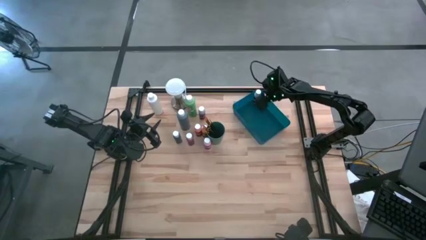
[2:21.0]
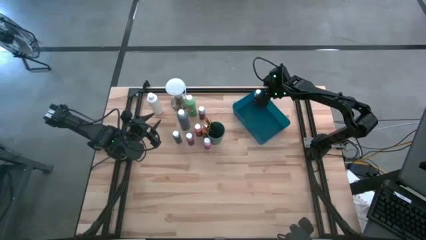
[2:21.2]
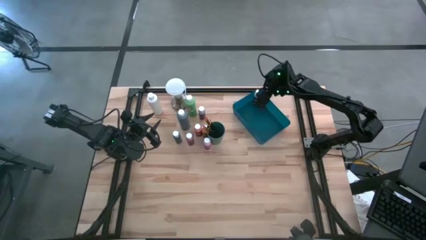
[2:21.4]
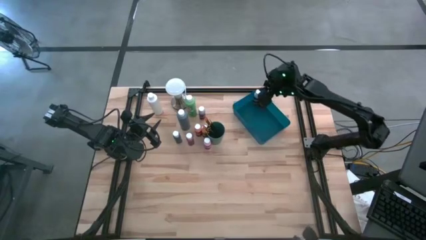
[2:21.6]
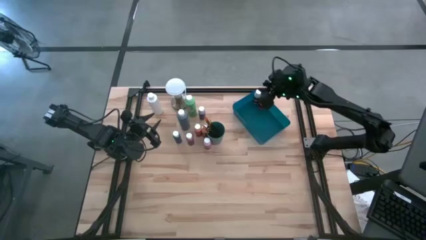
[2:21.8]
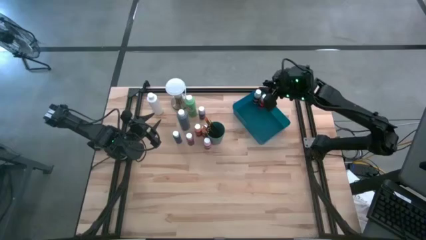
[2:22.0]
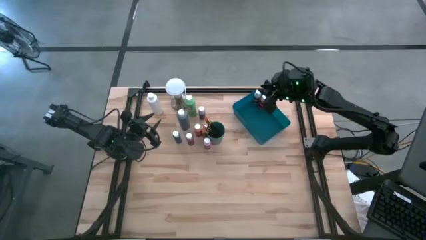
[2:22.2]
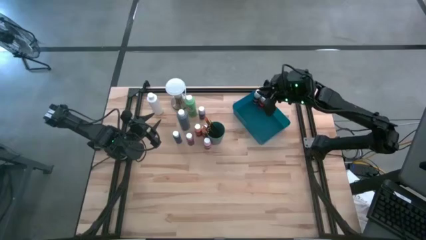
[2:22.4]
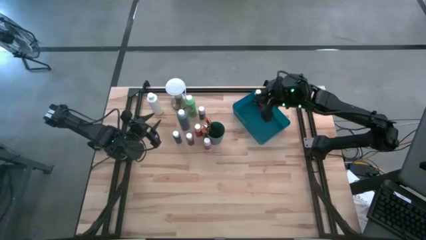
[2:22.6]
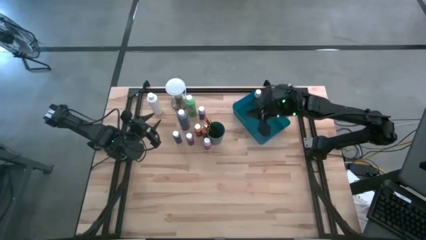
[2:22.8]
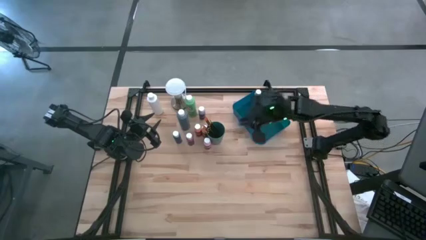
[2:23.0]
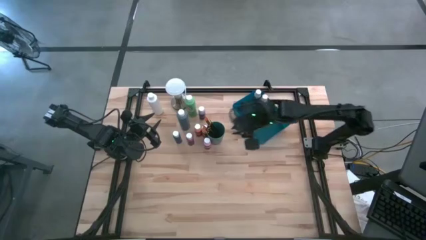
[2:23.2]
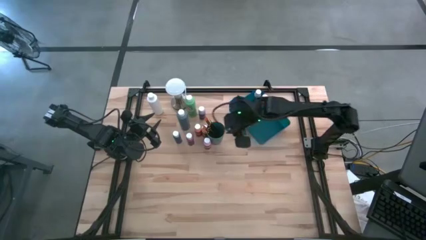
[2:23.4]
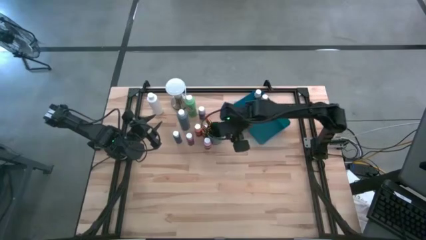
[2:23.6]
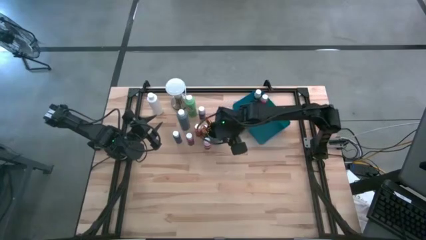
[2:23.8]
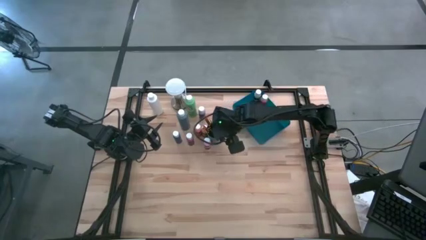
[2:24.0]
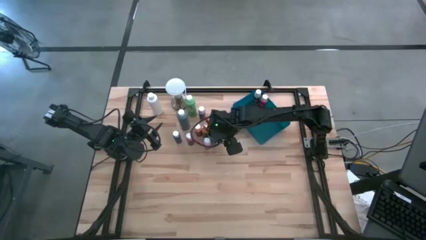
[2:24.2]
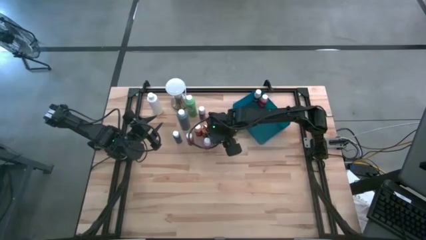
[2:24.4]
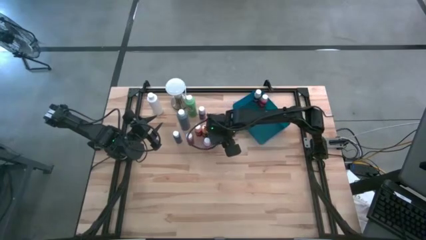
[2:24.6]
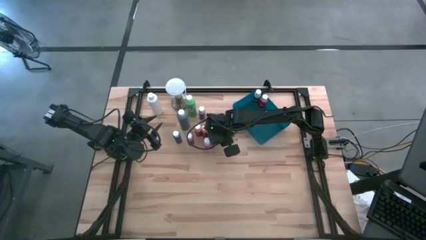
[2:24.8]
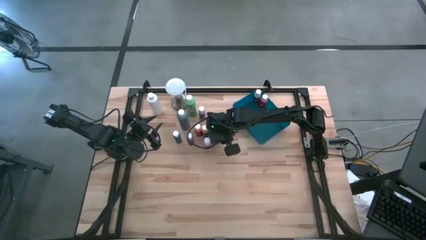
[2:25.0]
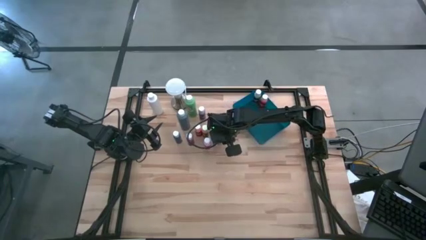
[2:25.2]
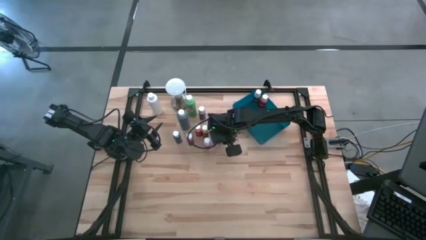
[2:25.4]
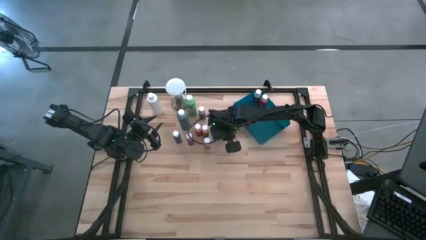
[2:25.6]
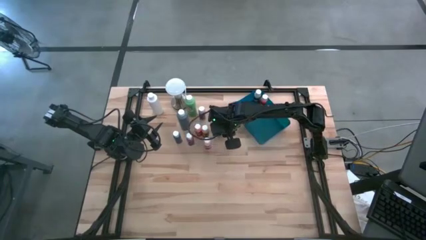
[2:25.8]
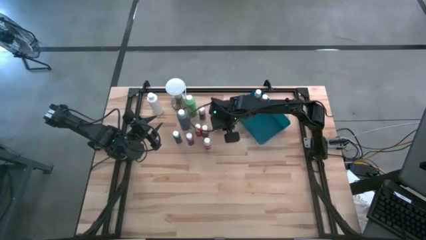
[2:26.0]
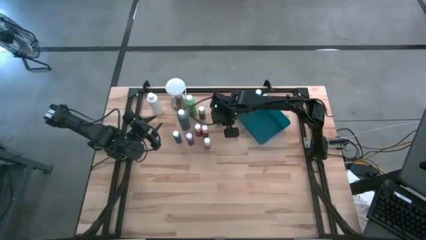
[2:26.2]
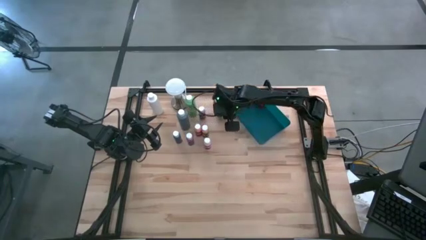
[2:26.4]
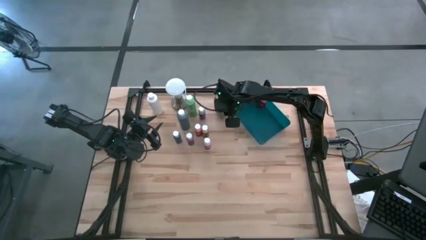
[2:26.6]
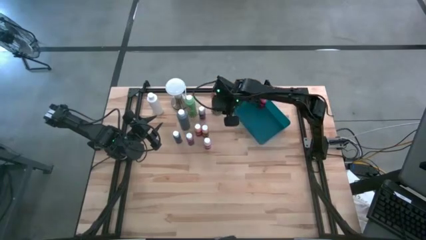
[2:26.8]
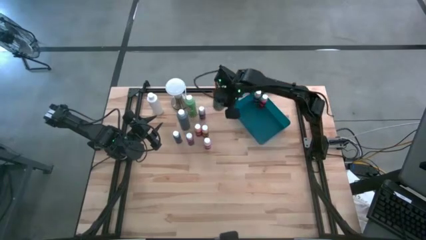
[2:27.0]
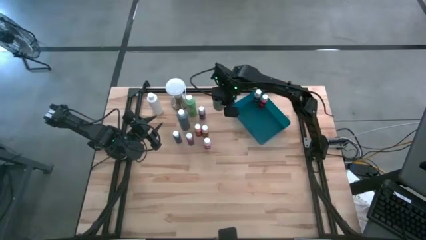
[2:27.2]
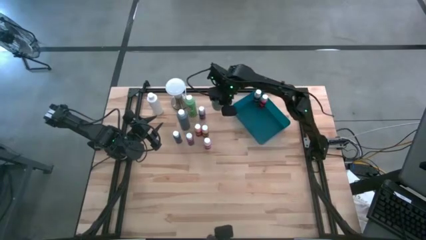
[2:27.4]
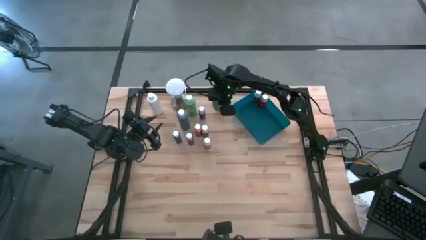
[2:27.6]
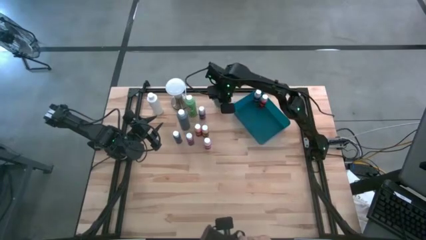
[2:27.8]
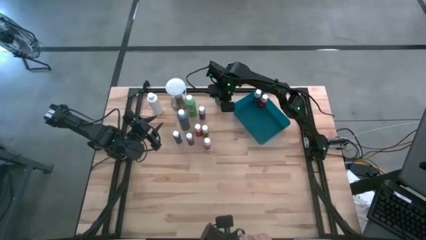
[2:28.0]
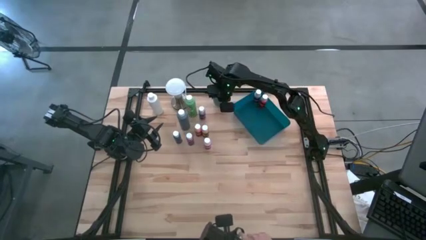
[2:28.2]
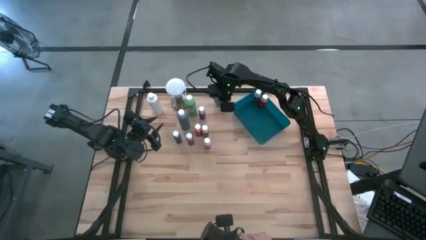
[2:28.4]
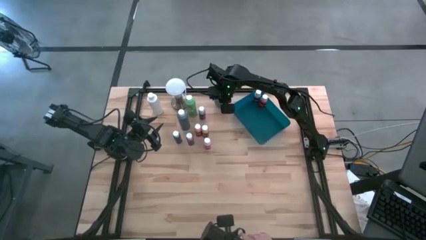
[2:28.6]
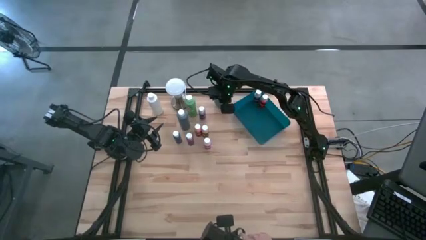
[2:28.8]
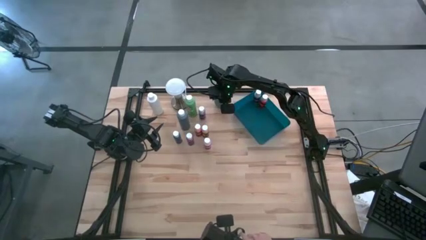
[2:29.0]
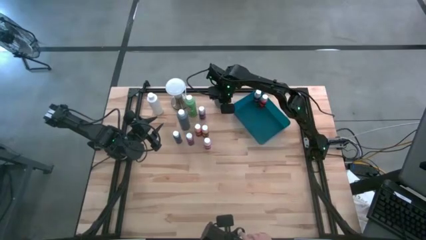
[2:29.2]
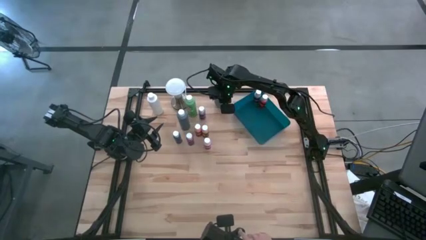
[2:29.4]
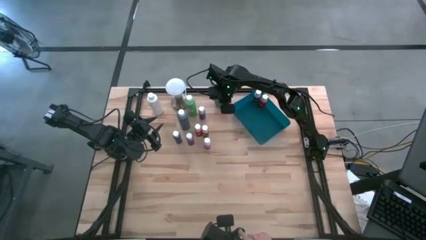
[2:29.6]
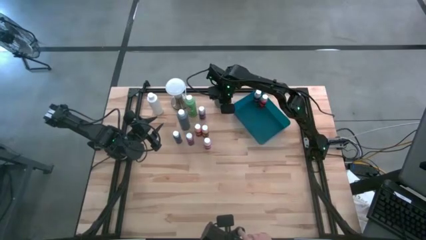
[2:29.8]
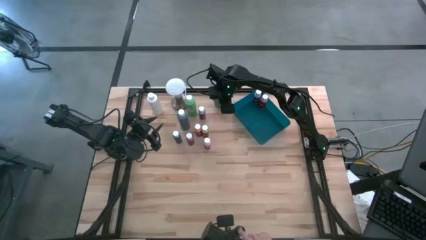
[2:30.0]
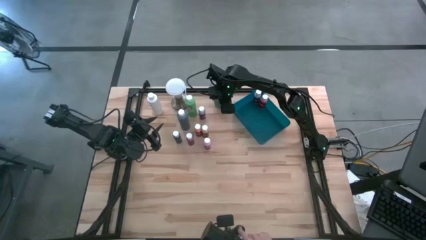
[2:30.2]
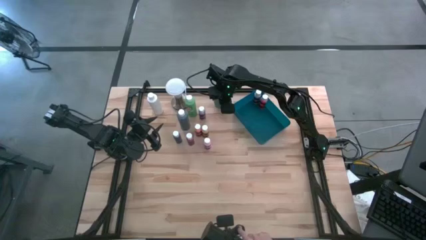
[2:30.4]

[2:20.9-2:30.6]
Task: Pick & Place Paint Supplies
Adjust the green cup

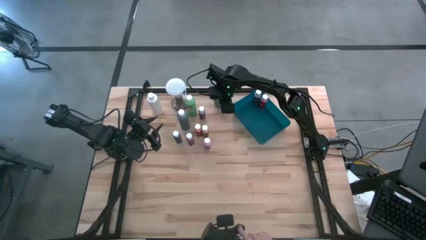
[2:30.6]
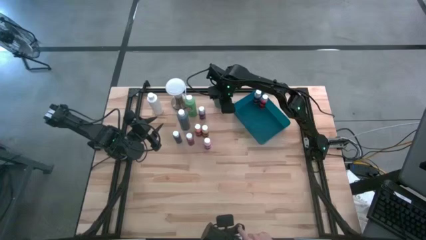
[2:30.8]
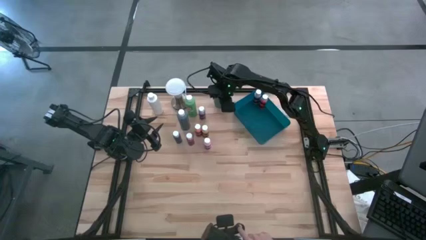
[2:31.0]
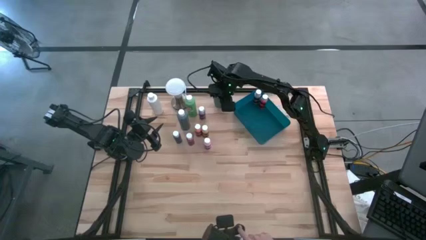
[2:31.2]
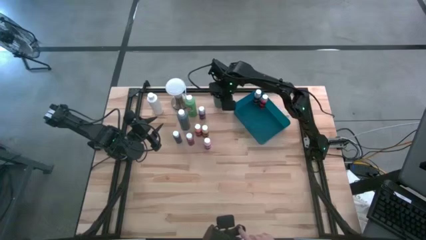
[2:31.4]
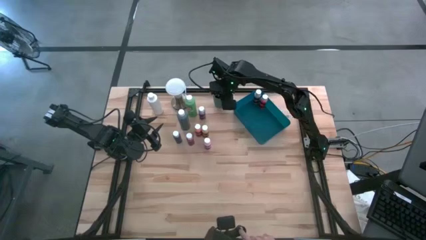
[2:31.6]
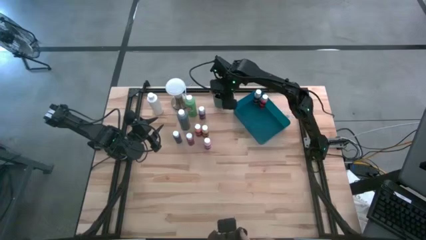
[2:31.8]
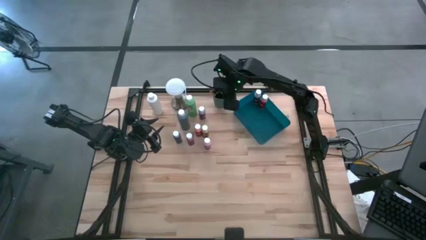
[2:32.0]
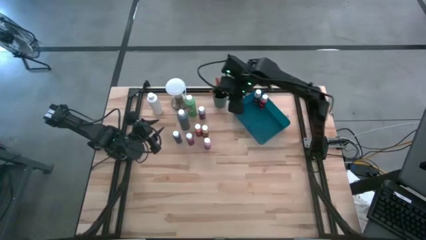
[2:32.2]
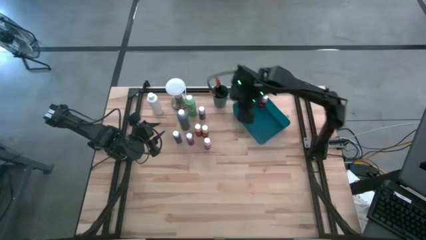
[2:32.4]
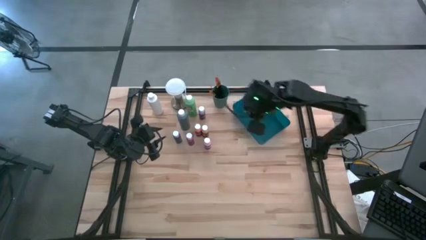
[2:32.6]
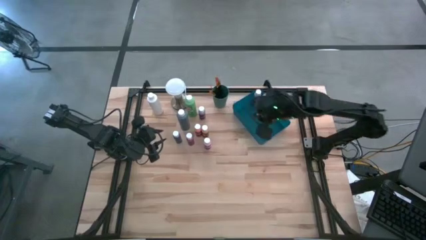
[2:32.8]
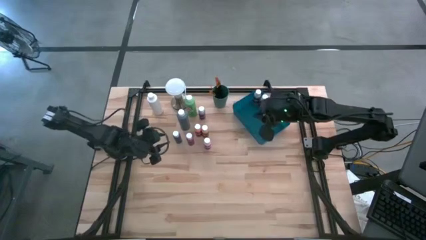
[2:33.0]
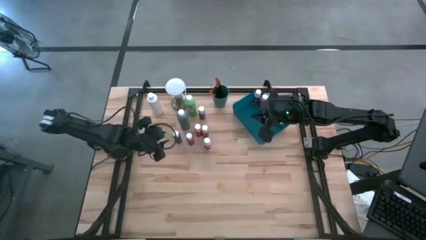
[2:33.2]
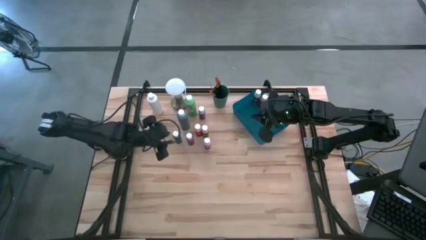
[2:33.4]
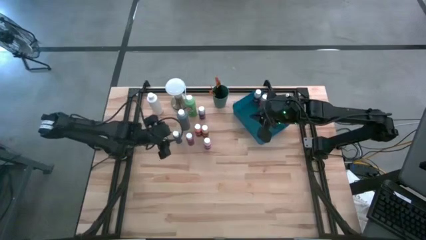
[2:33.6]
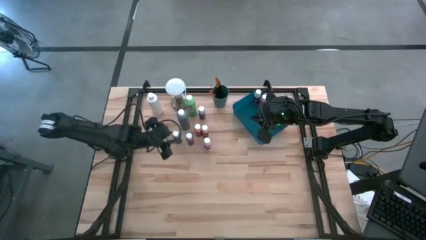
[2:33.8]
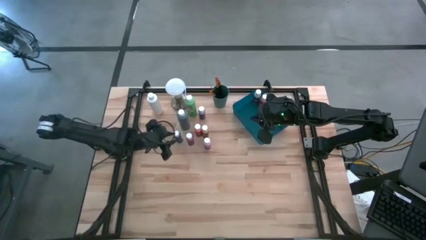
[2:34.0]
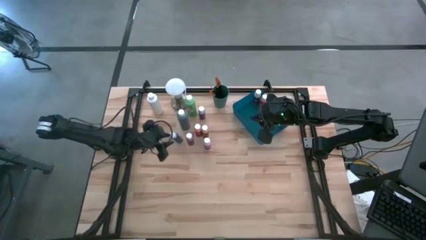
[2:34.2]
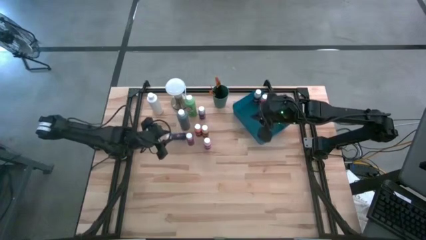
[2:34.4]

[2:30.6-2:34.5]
Put the small blue paint bottle into the blue bin
